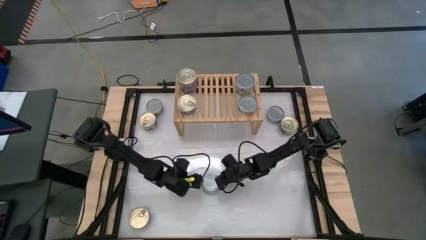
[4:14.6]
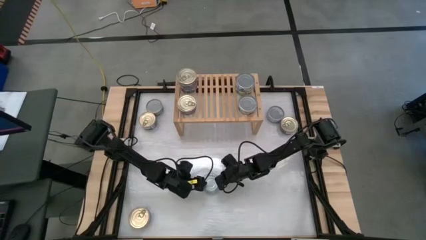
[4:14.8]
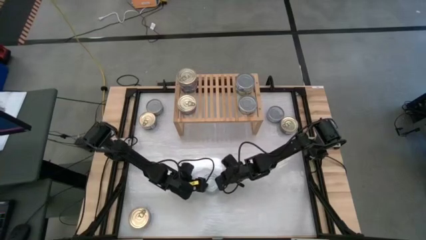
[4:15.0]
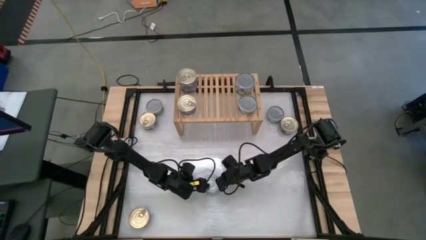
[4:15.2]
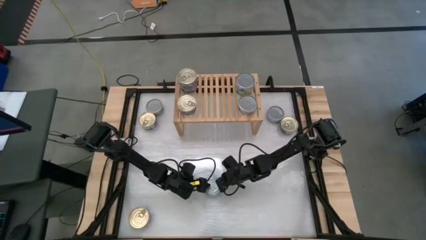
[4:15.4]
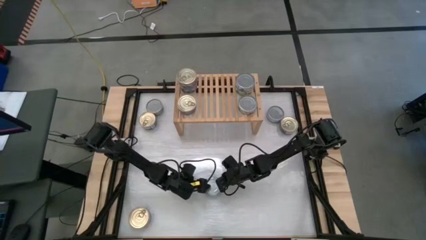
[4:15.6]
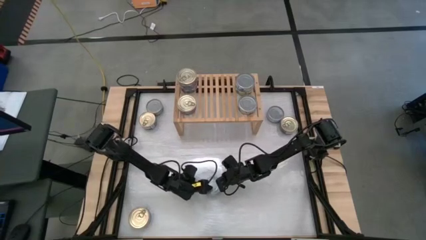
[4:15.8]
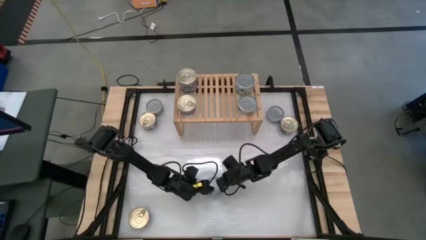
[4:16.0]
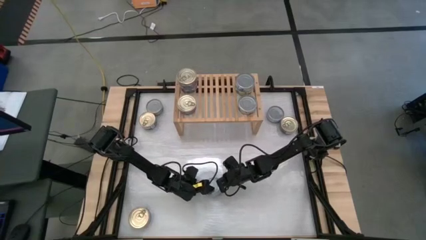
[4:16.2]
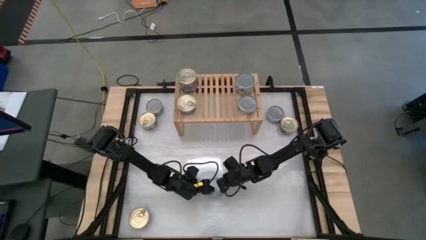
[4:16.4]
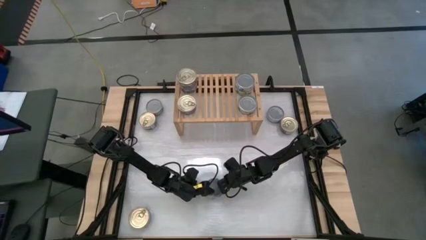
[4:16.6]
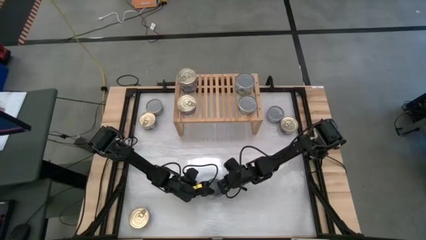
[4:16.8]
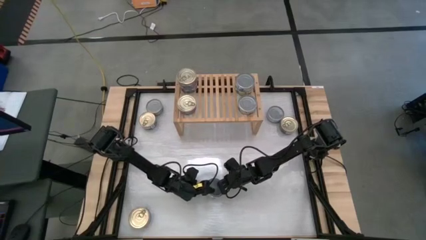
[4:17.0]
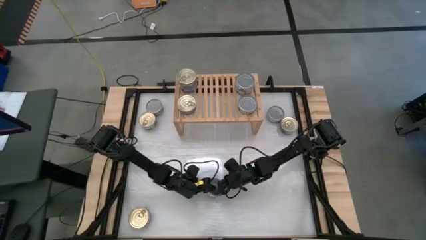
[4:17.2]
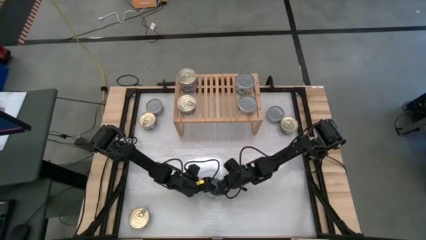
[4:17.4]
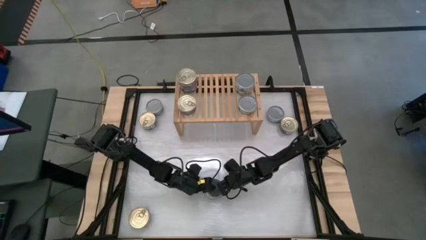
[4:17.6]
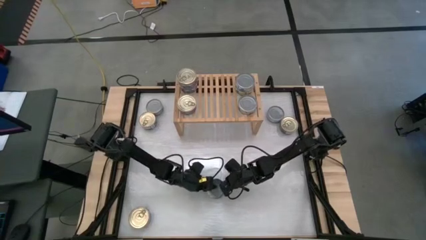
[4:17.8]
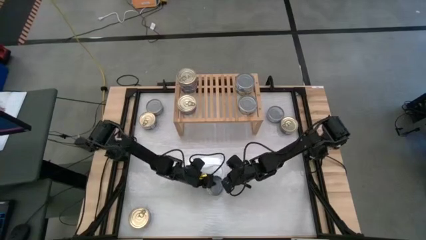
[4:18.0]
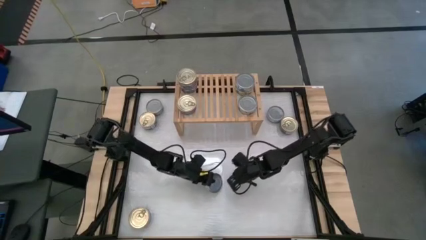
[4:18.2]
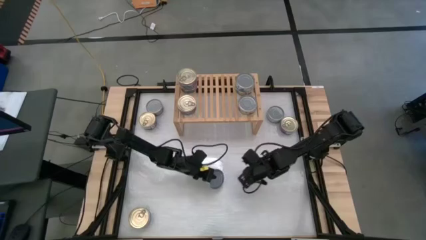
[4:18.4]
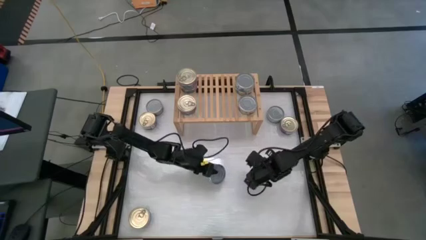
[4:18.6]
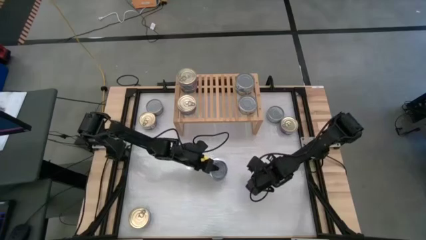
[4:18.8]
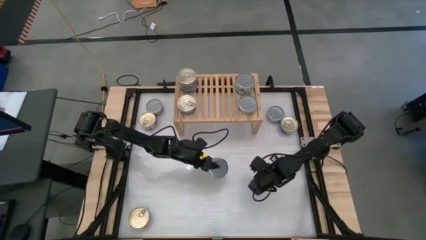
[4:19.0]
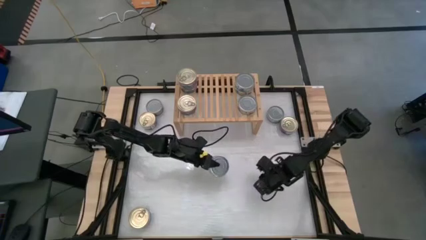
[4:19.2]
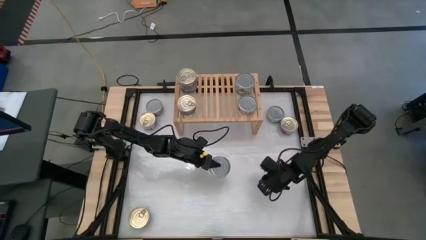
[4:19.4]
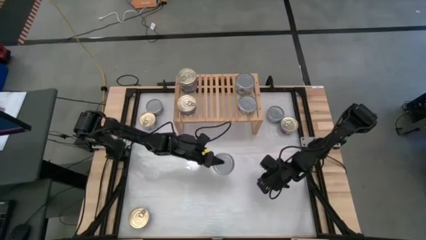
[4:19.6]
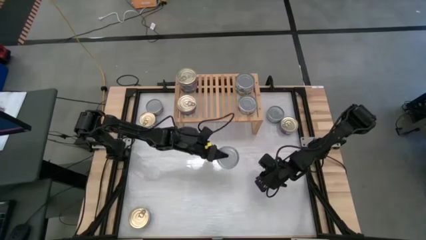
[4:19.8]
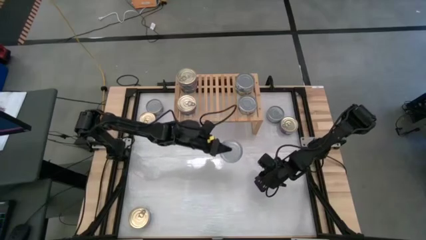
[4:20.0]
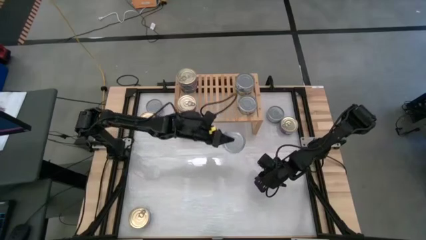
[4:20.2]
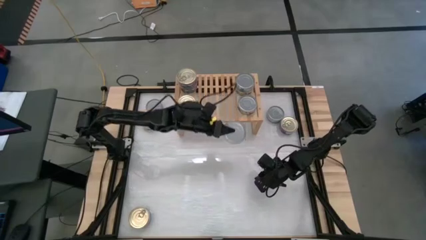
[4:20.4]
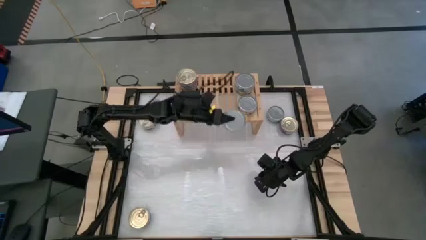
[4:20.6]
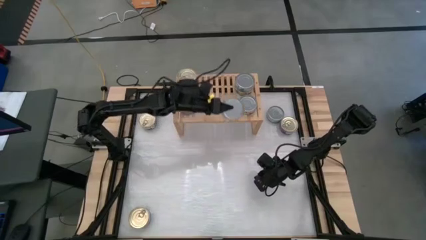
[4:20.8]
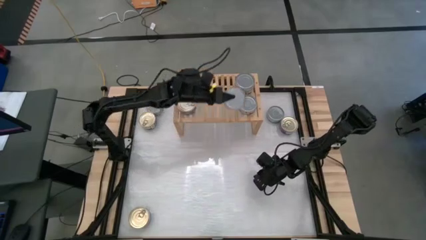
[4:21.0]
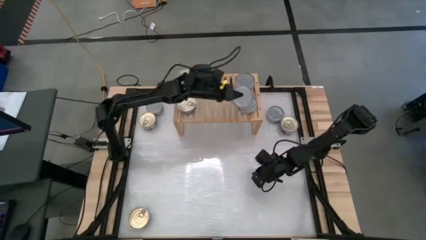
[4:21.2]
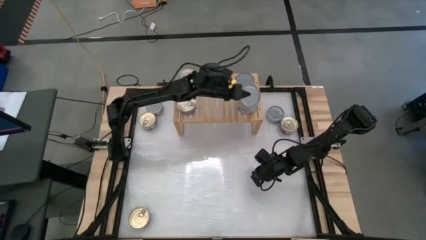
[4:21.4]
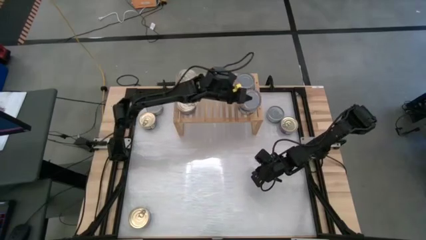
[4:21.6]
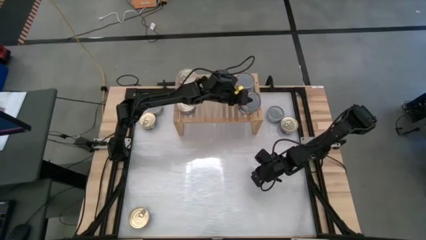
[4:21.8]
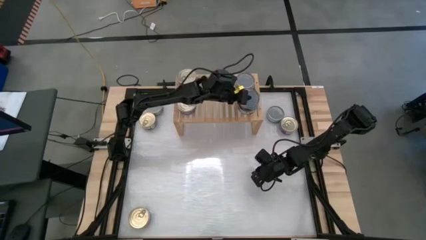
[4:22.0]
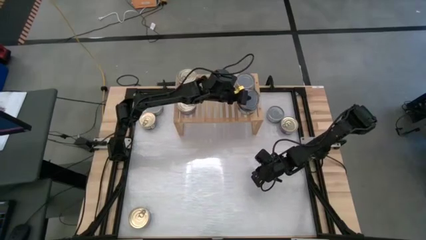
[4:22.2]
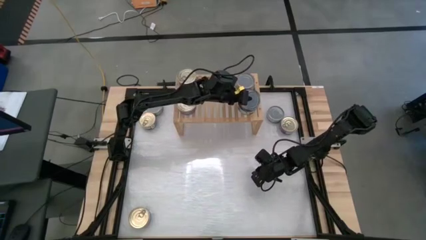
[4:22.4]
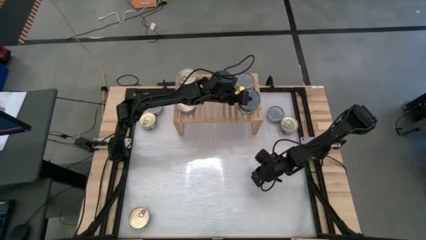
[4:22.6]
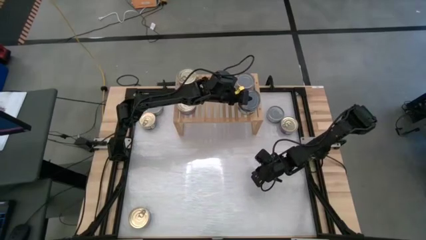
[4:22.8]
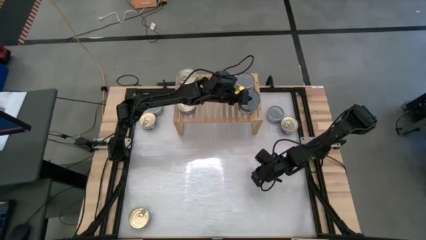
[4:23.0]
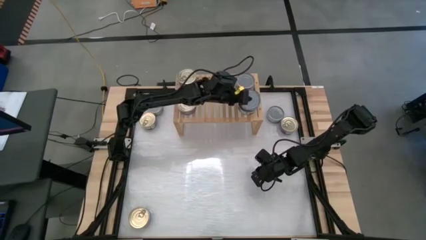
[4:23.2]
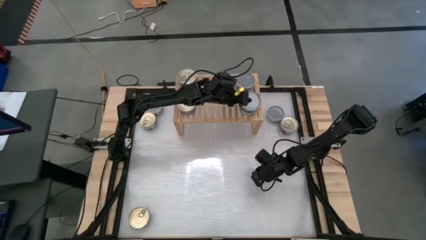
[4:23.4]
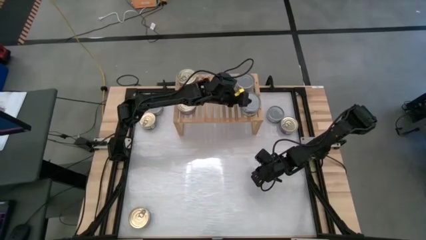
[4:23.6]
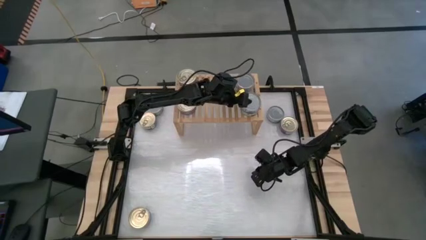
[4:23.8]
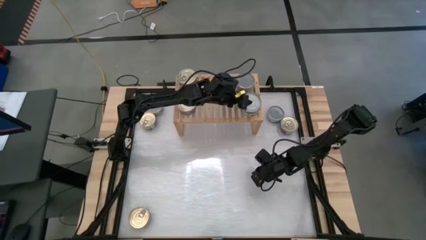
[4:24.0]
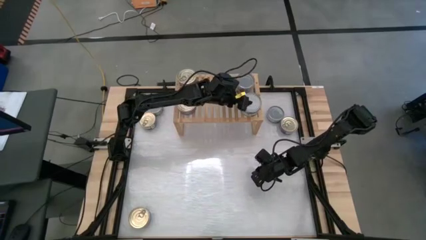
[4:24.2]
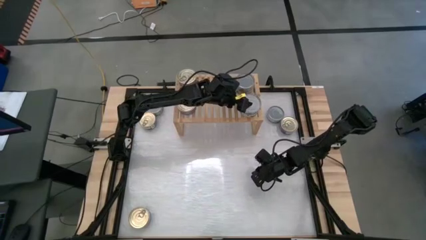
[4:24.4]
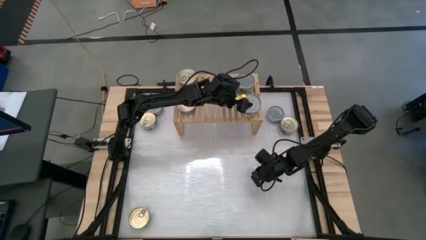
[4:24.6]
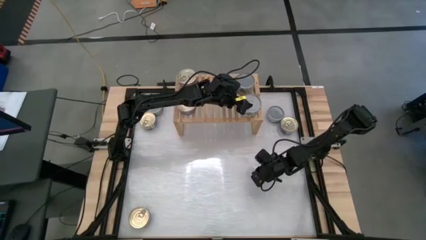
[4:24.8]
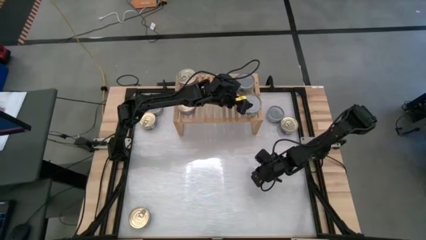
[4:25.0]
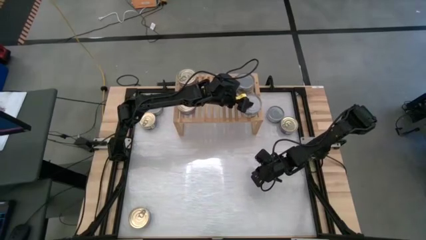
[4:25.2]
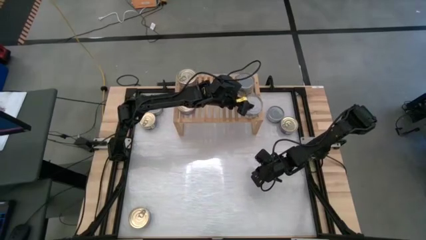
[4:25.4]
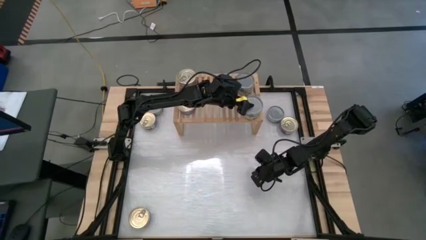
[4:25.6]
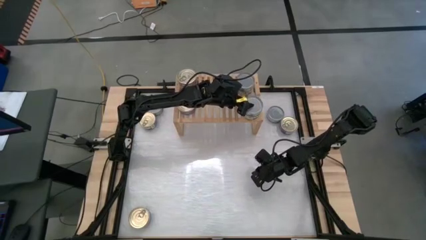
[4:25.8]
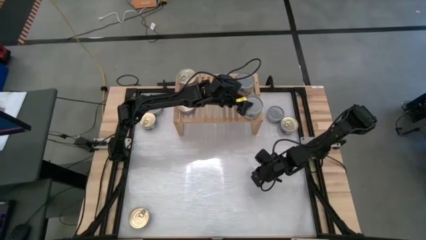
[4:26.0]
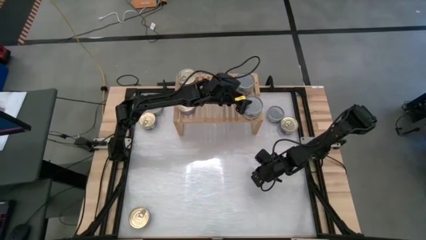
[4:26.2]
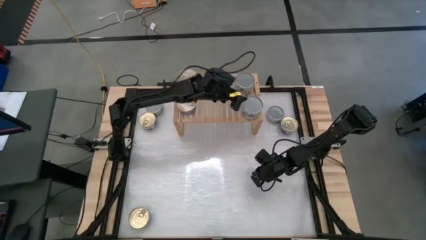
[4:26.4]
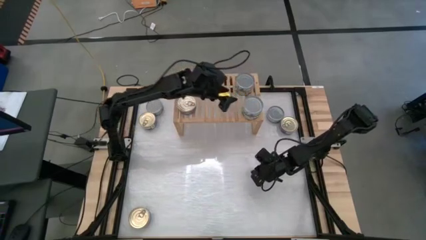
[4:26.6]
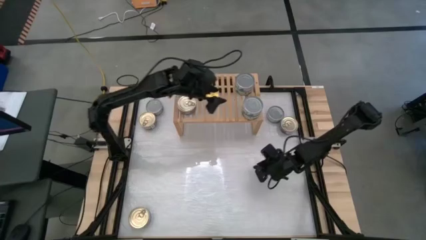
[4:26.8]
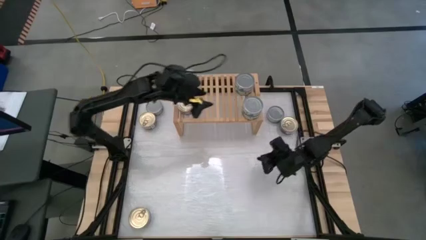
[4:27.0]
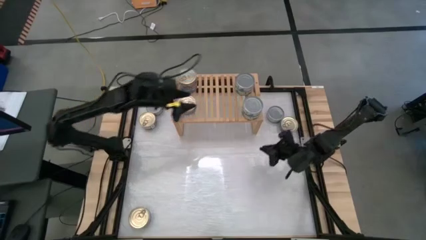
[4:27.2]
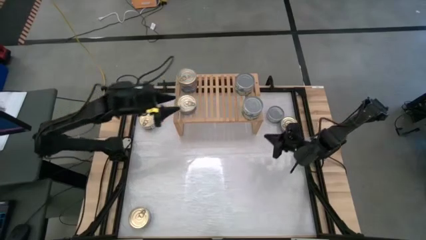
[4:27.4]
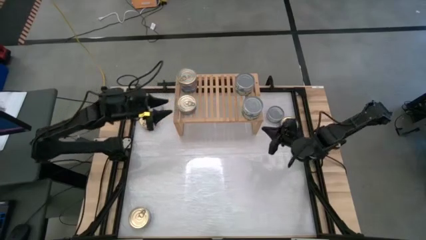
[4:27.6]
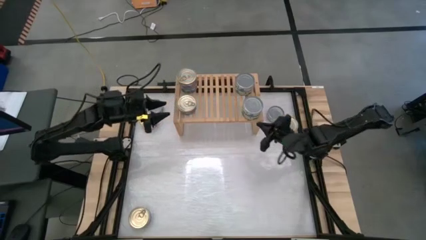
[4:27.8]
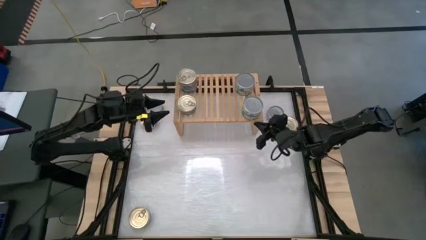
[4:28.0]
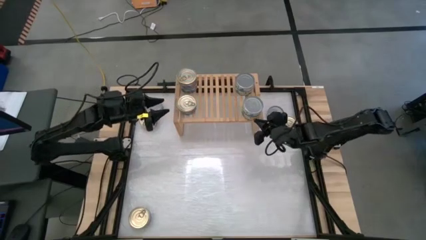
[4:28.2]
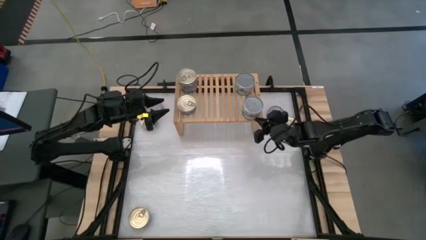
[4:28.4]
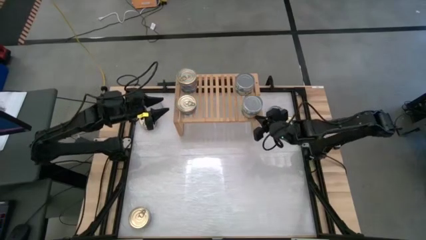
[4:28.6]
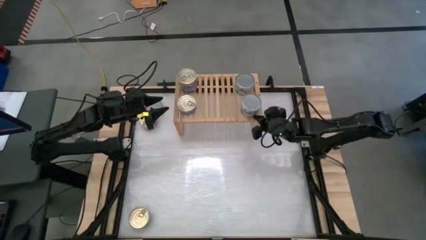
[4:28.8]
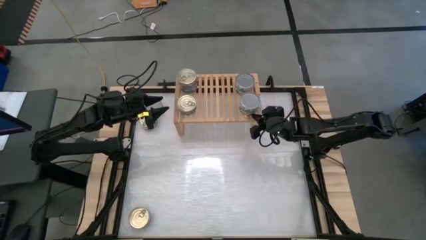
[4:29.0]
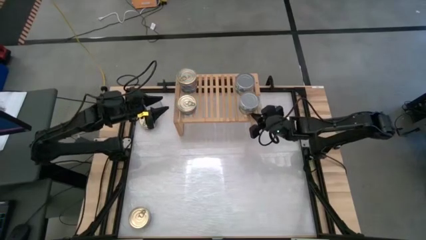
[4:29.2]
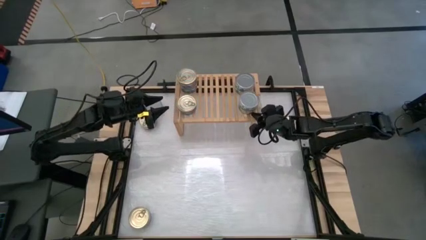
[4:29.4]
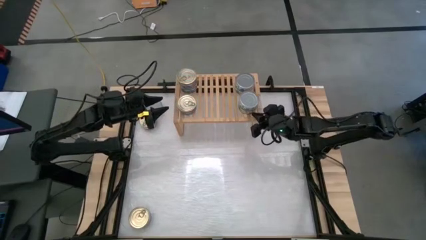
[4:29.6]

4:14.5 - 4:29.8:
Task: Stack canned seafood by type on shelf
Stack the green tuna can on top of the other green tuna can on the shelf
